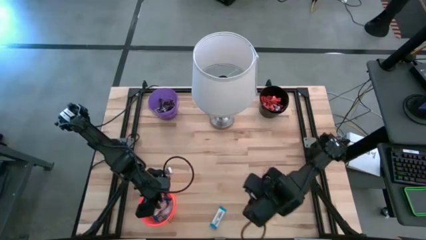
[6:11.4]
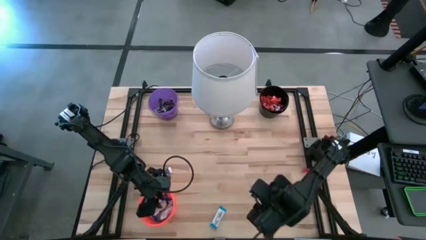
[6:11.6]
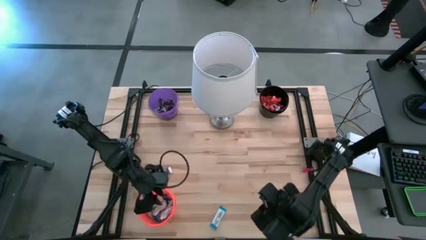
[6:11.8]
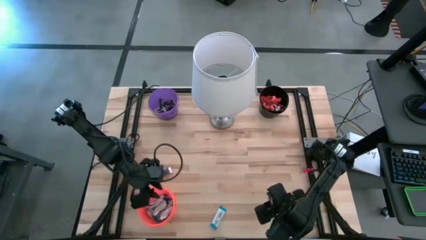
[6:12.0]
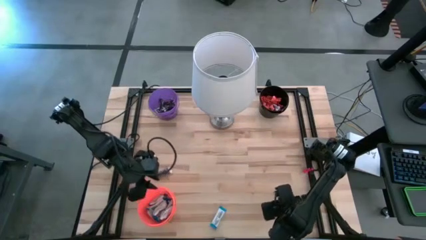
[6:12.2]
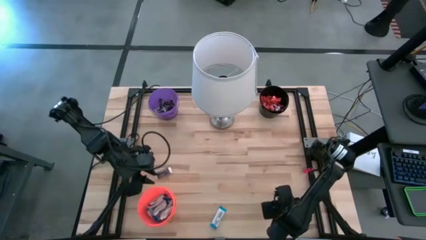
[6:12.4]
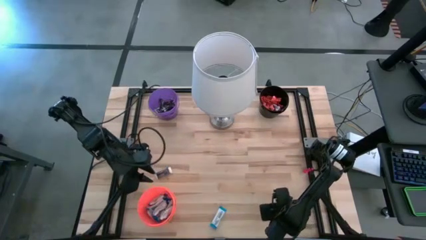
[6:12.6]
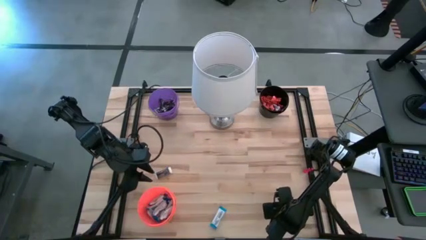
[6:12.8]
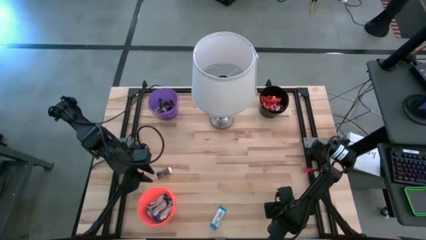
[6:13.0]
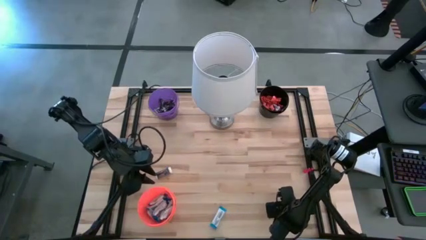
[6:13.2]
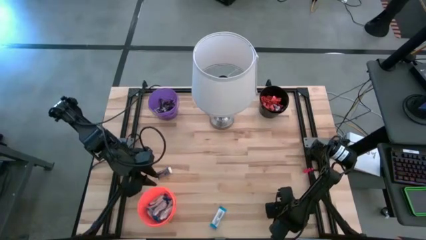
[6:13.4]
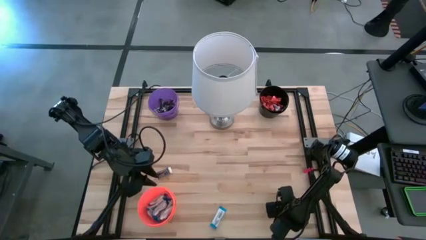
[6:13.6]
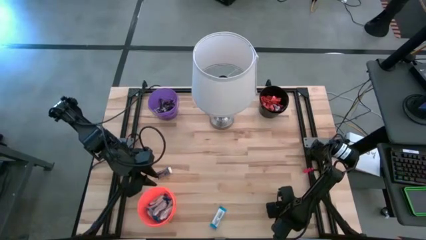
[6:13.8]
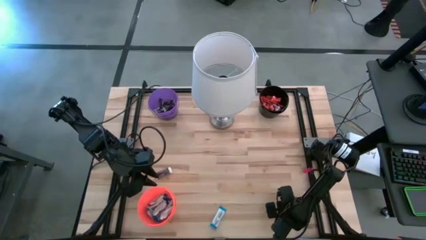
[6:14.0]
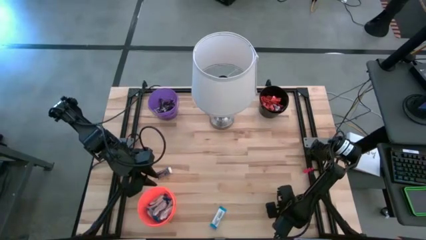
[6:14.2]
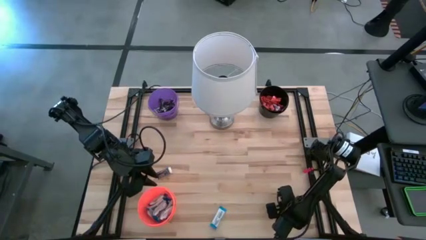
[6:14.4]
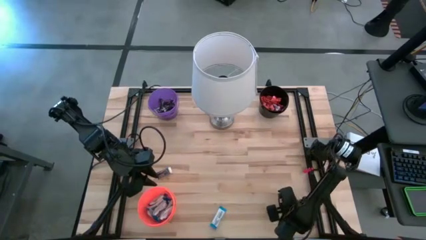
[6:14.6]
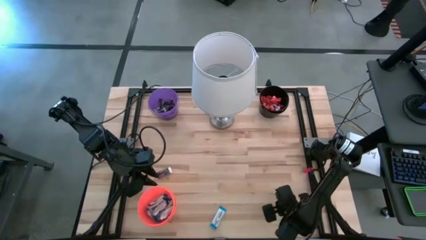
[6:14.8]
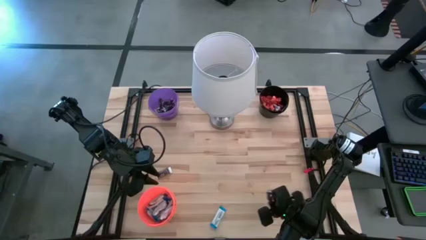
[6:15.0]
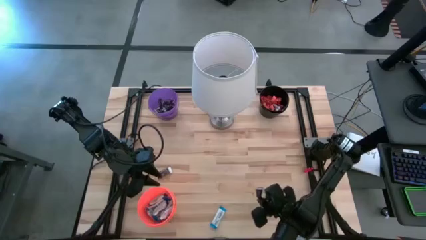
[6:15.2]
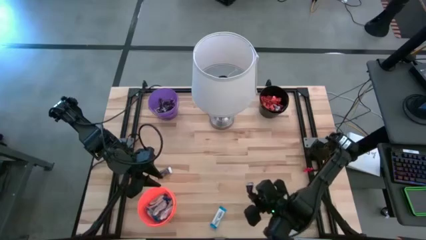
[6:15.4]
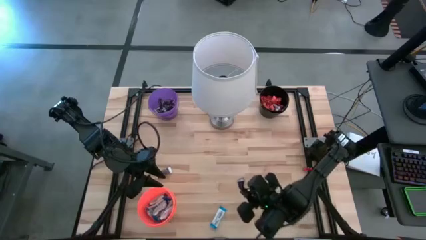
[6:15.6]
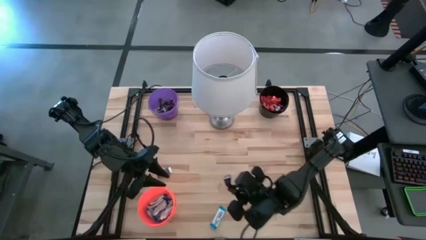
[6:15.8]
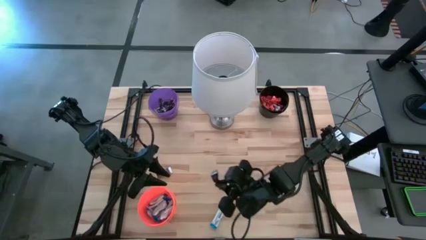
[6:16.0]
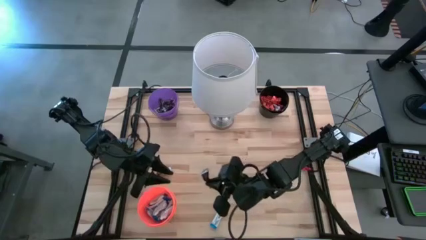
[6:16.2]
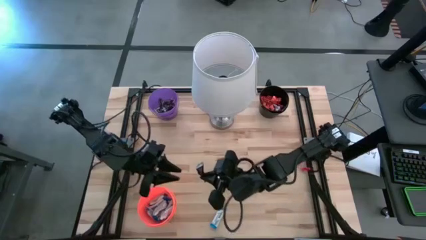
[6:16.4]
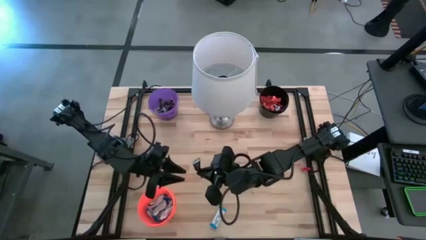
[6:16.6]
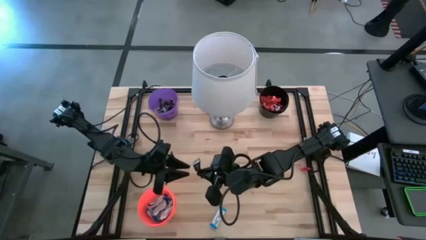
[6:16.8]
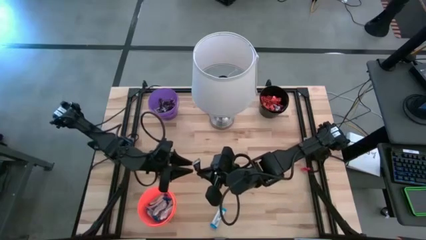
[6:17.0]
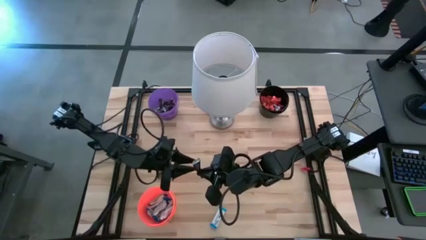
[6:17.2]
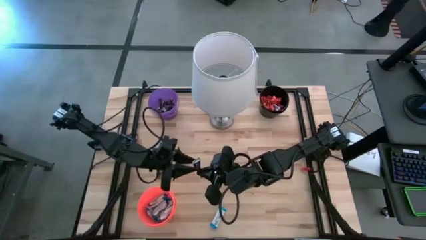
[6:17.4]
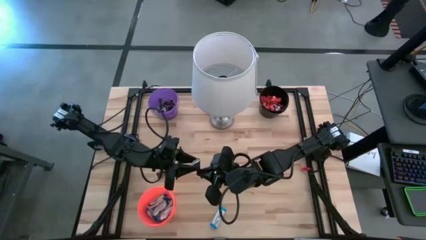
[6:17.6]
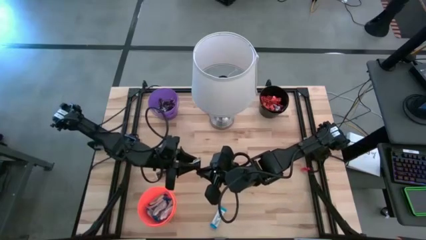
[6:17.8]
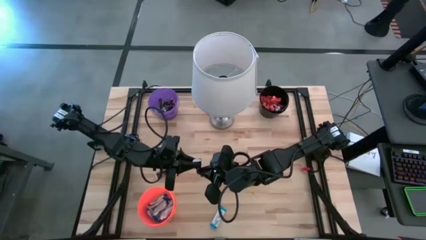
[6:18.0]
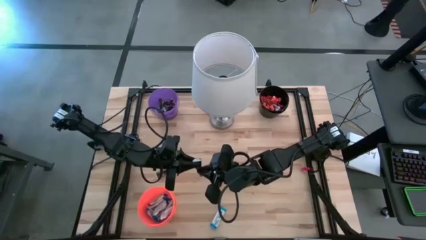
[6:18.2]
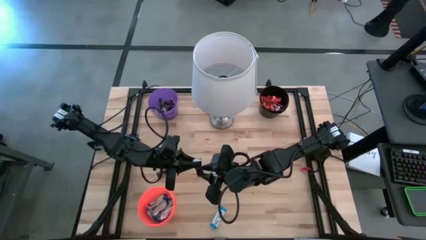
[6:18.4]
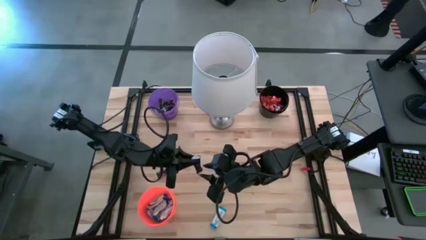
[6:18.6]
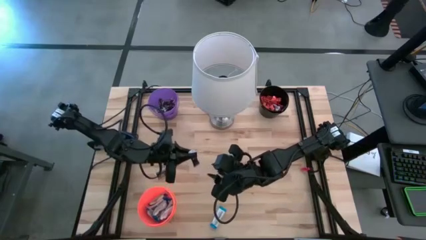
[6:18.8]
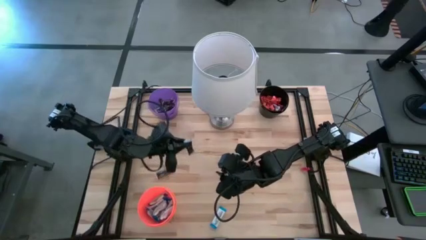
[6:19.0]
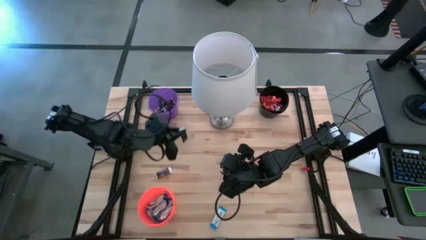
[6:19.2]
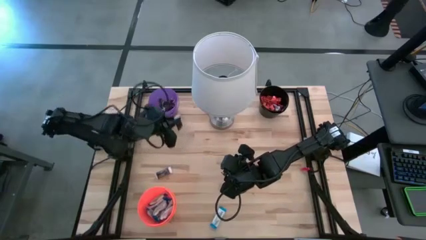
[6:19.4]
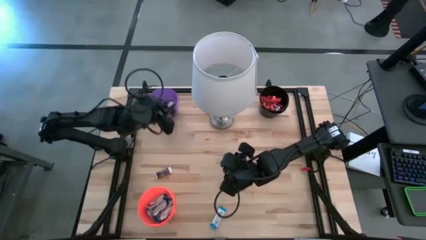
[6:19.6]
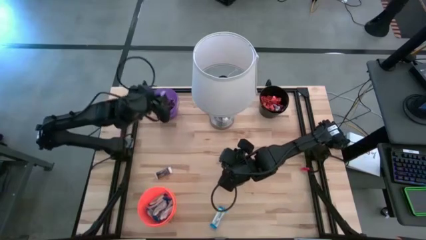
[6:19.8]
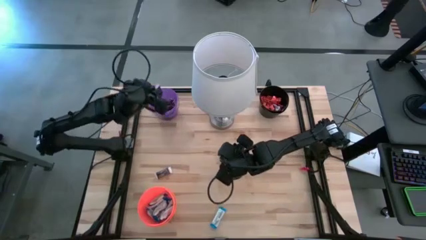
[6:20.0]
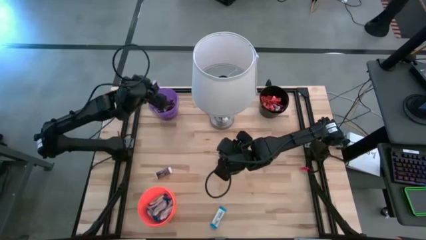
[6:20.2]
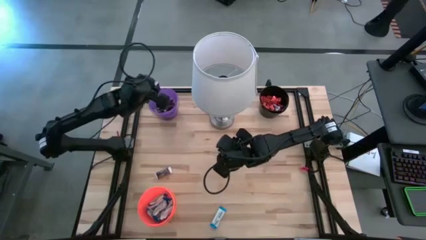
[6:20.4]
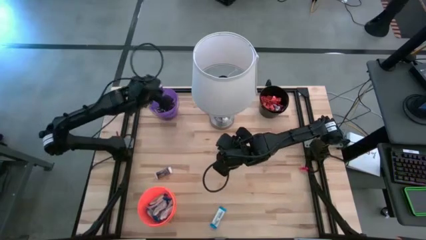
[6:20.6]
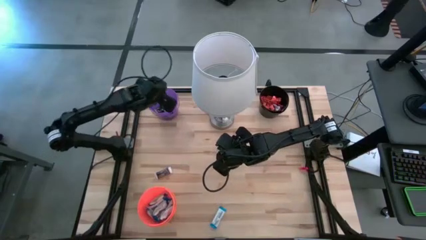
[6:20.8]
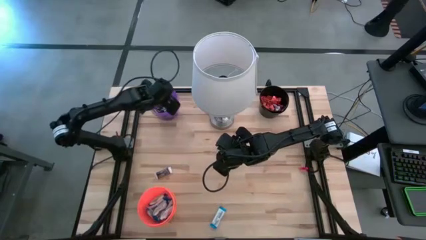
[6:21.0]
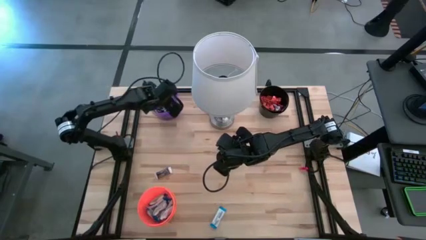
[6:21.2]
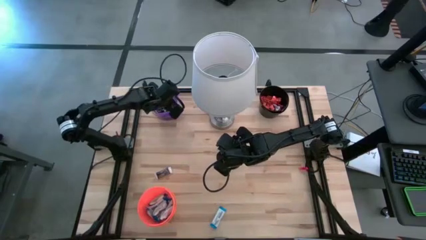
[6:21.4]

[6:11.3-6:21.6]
Task: Organize candy in baskets
Put the brown chocolate bar into the purple bucket

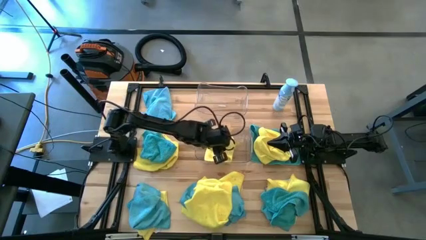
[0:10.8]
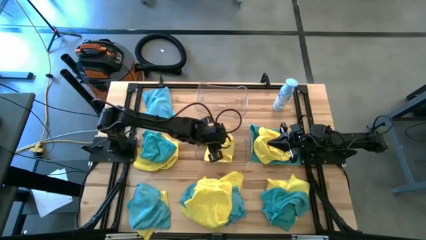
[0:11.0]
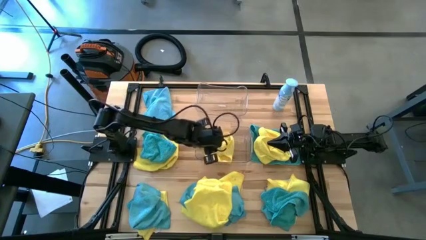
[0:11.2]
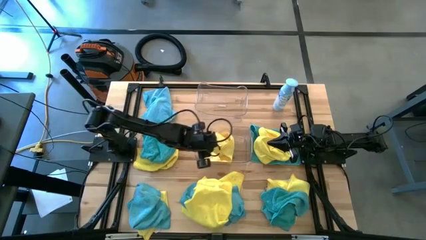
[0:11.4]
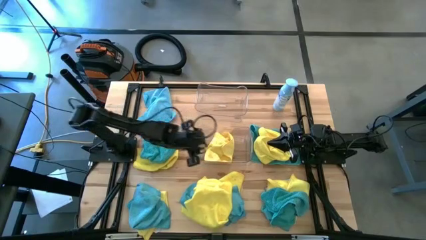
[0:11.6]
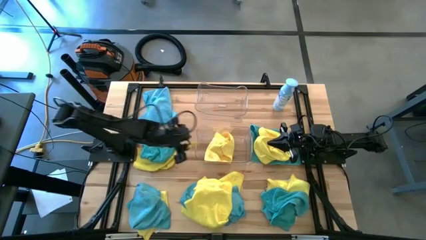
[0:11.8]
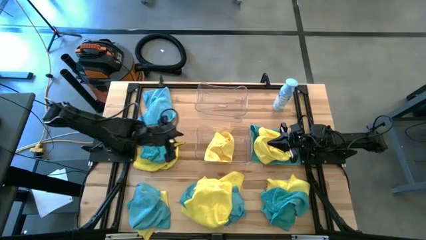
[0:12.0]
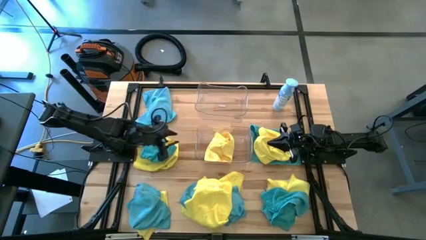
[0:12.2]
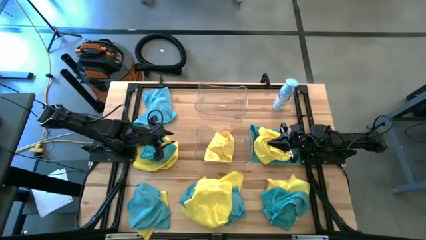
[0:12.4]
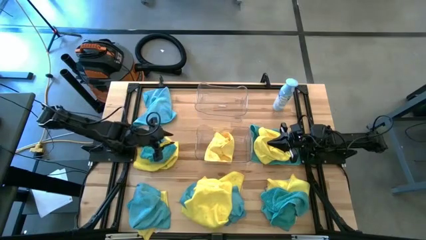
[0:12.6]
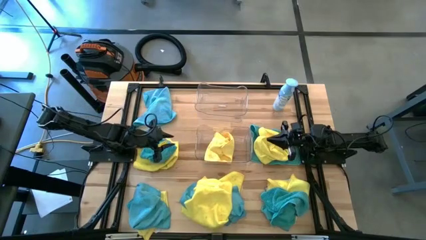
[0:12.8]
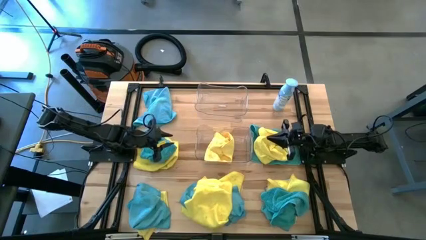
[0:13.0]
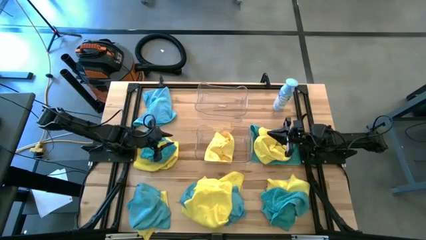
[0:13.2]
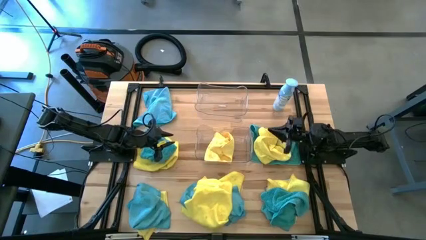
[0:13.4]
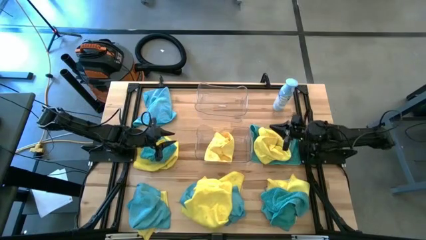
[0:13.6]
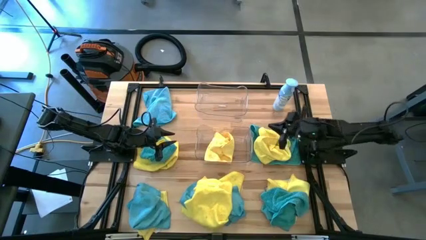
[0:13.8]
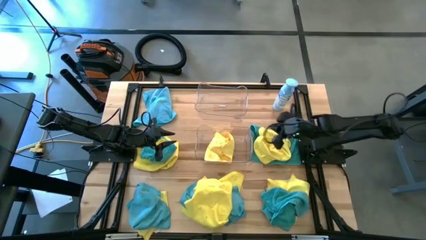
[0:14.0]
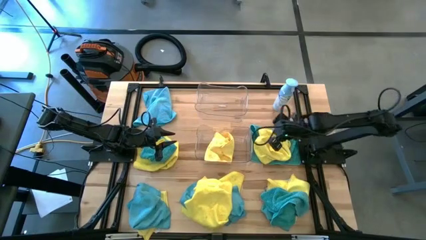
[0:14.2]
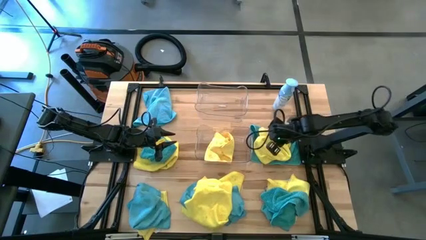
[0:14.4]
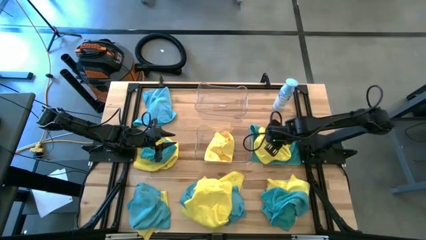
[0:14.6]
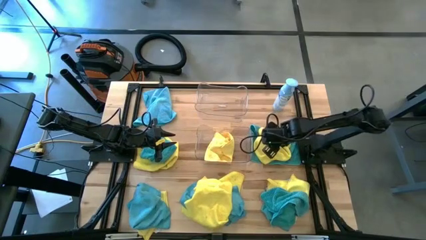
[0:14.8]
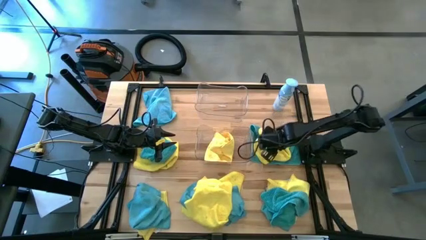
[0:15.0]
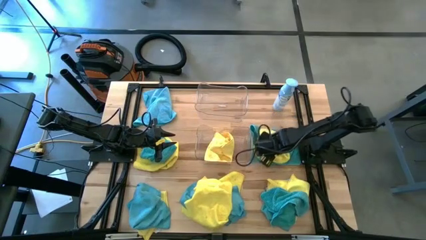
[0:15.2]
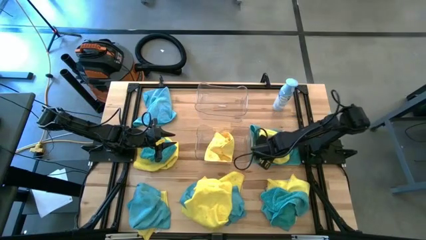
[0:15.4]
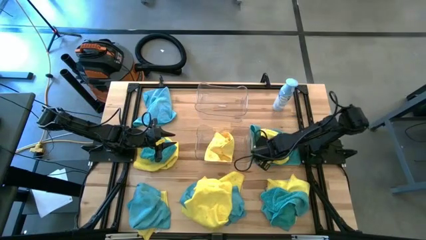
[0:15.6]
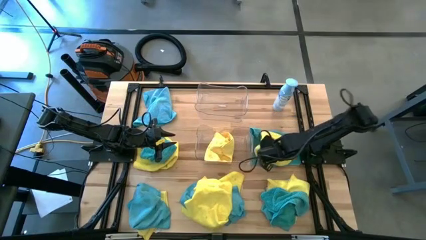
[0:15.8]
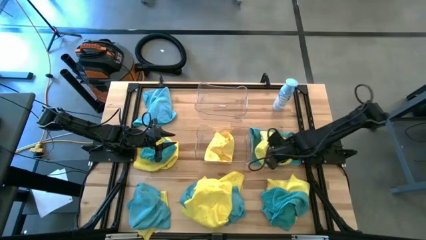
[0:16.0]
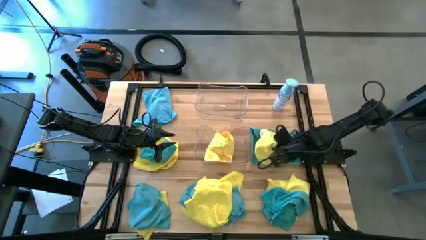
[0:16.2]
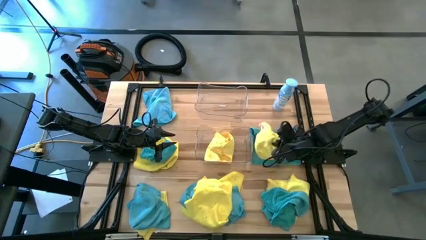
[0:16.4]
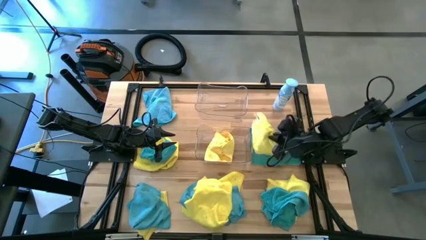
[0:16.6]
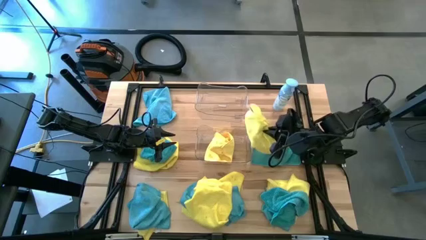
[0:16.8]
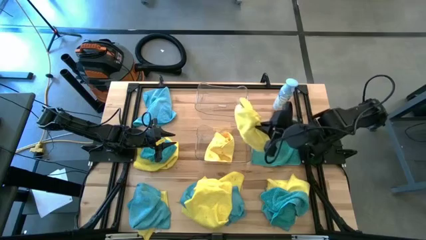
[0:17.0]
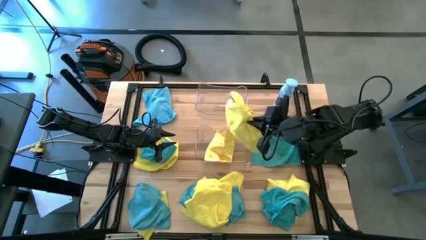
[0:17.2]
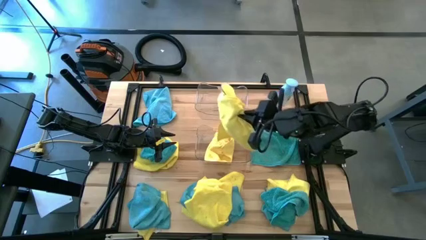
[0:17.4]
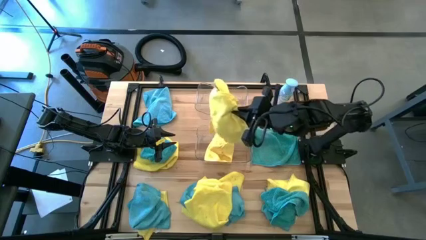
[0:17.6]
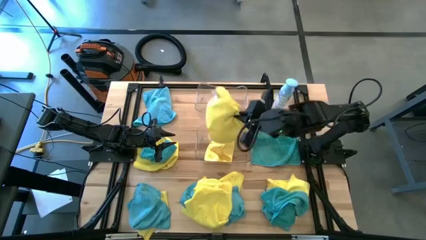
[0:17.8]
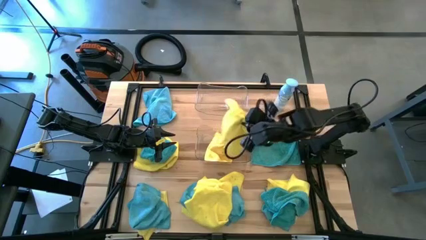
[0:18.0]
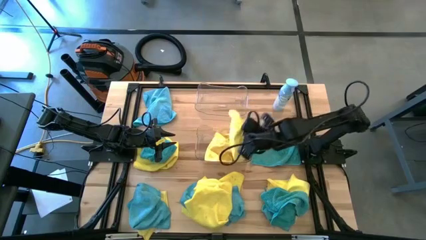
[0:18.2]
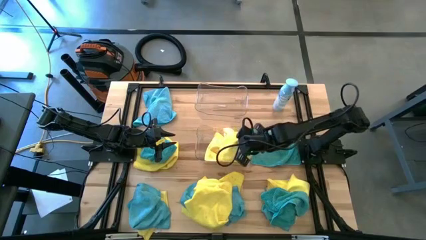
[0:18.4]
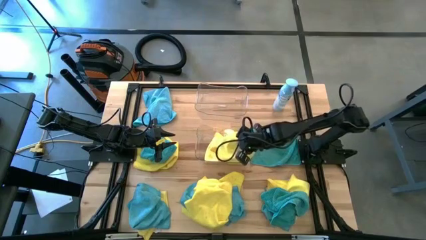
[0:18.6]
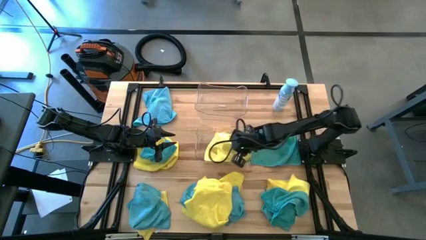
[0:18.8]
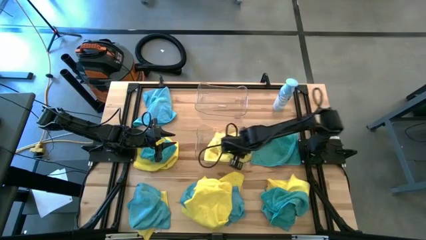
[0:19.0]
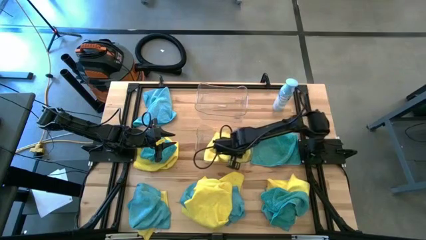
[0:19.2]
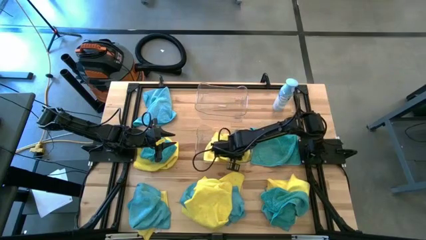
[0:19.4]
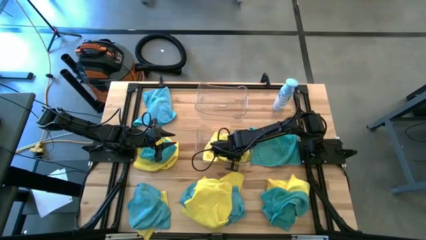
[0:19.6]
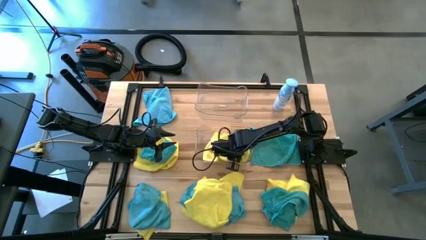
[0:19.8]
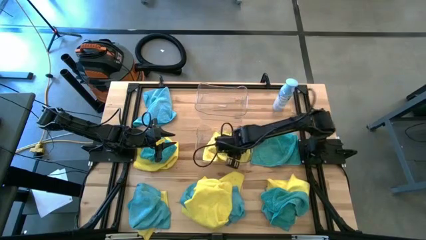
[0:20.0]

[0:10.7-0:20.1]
Task: Sort microfiber towel by color & place in baskets
Put the yellow towel into the bottom transparent bin
